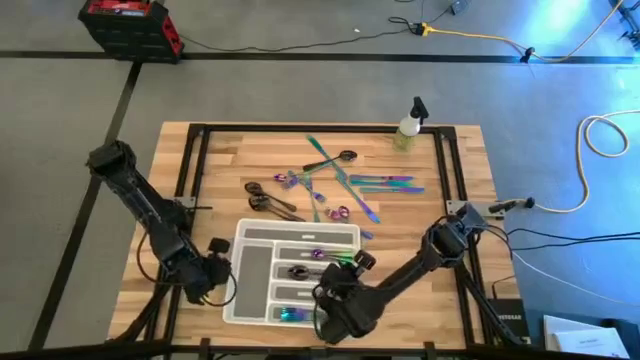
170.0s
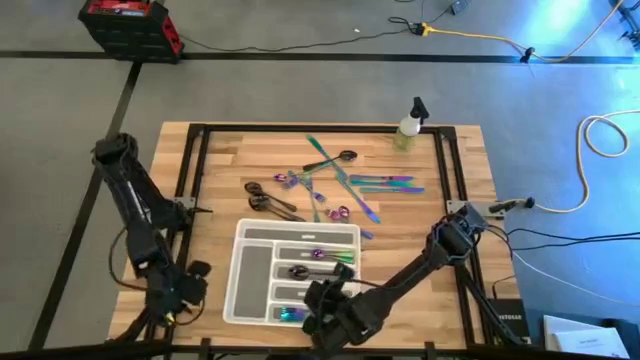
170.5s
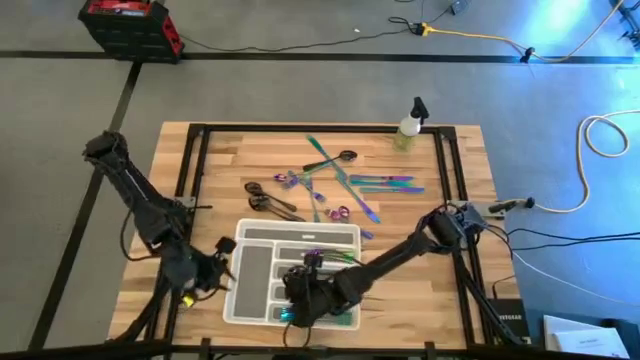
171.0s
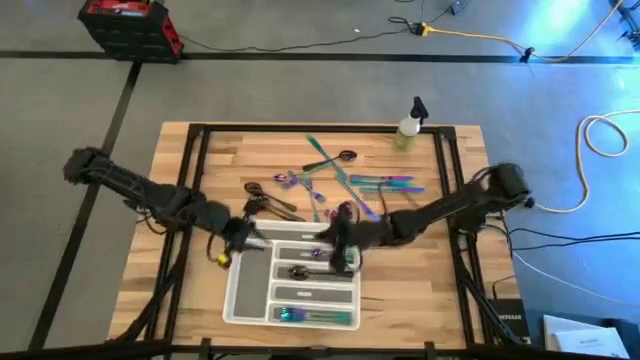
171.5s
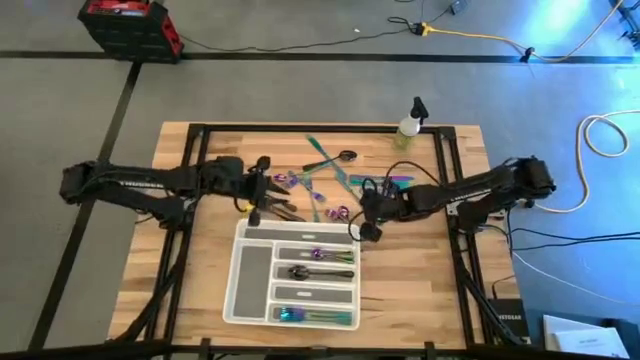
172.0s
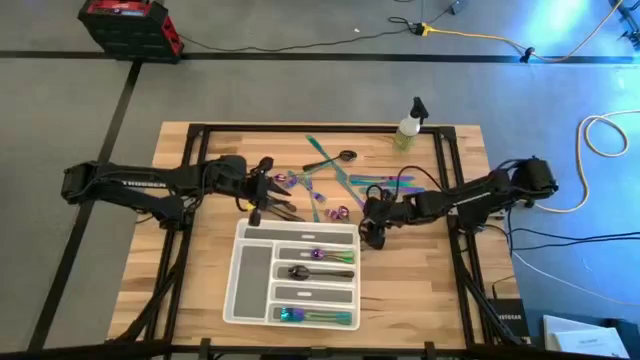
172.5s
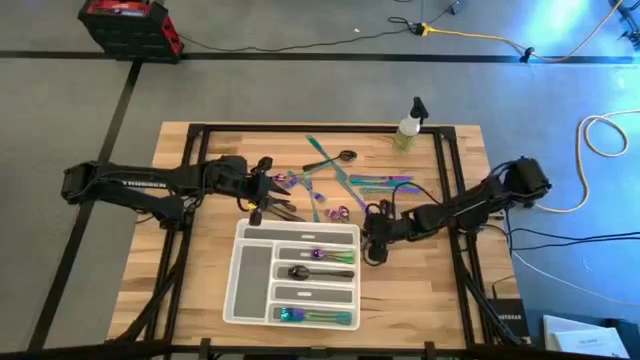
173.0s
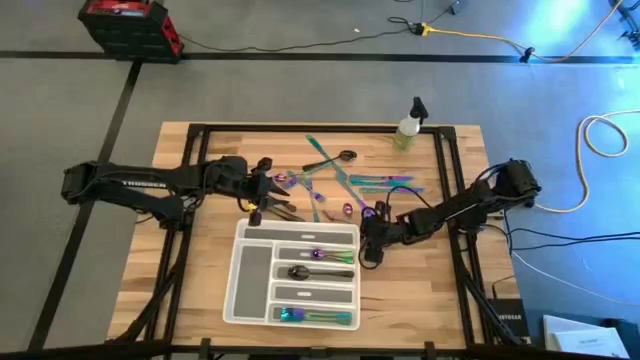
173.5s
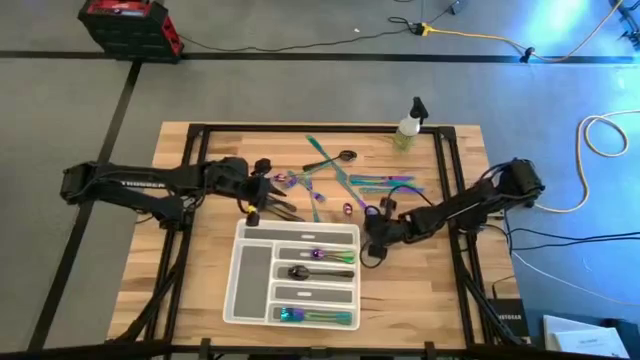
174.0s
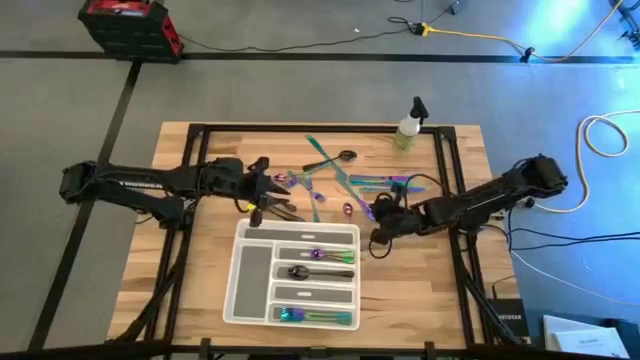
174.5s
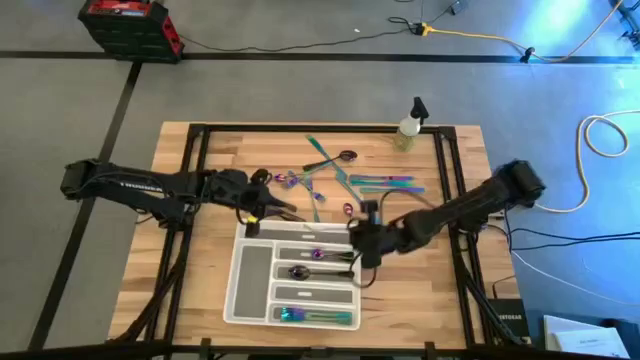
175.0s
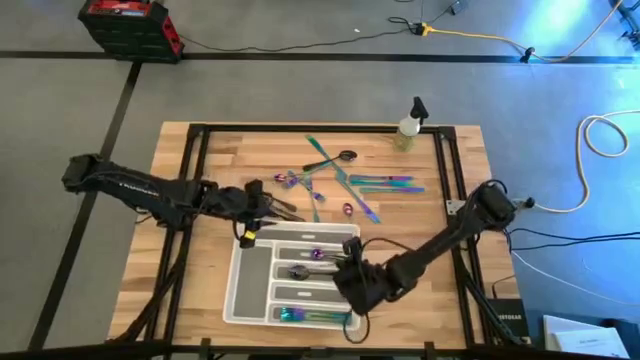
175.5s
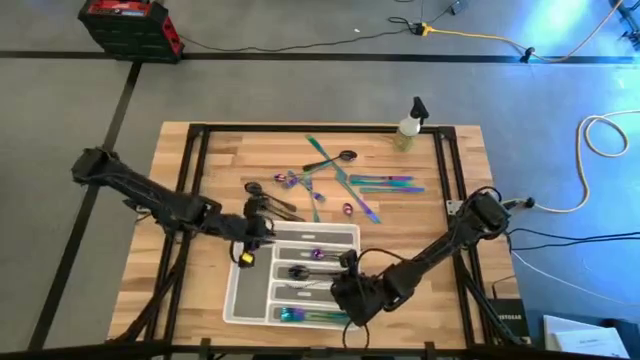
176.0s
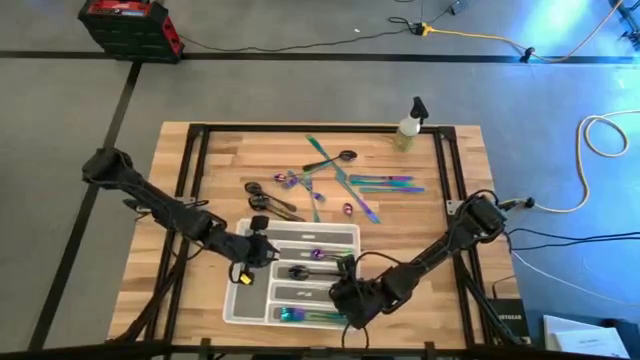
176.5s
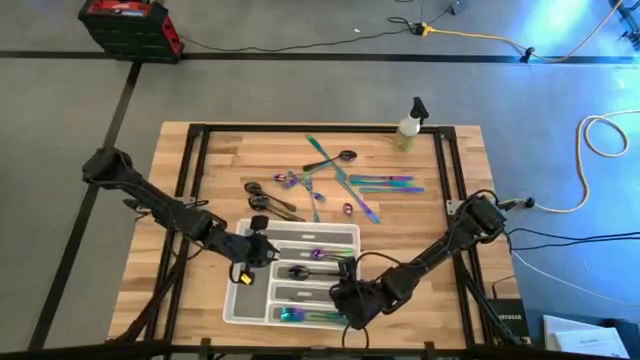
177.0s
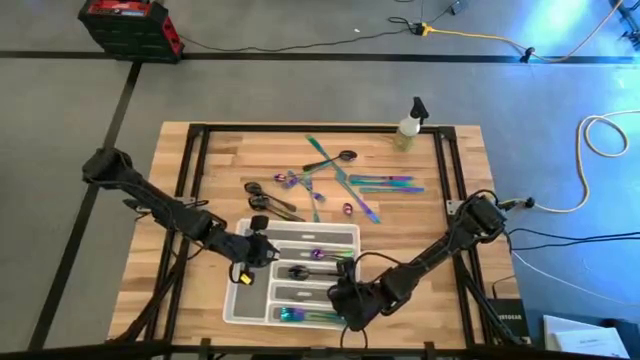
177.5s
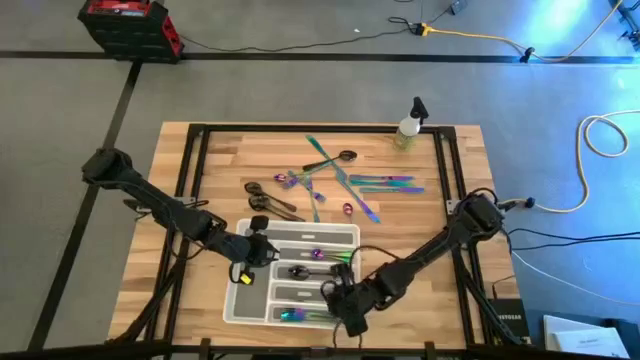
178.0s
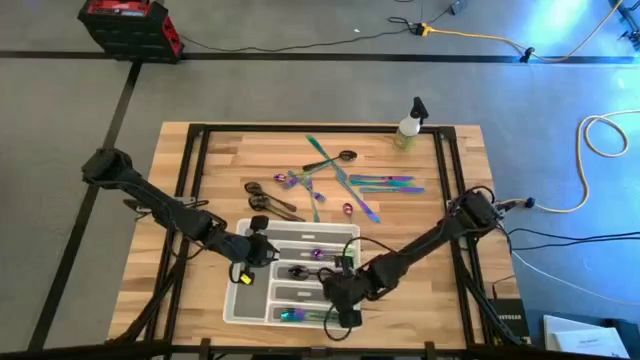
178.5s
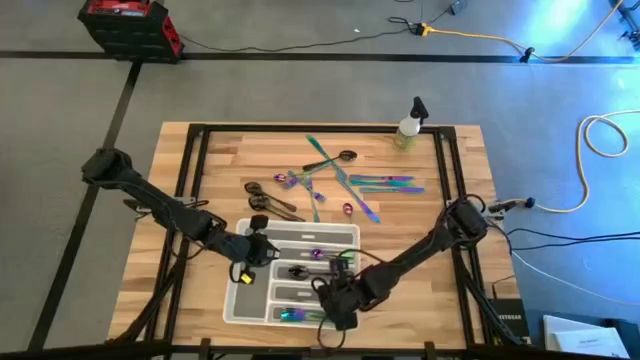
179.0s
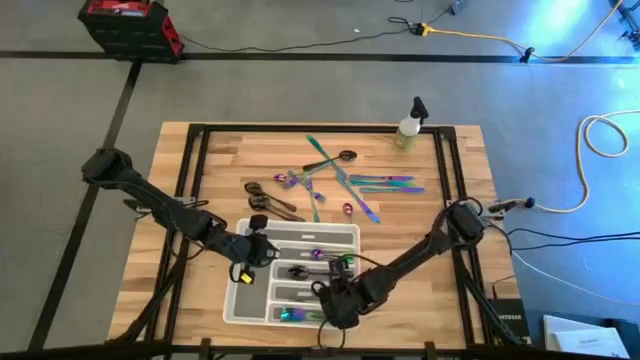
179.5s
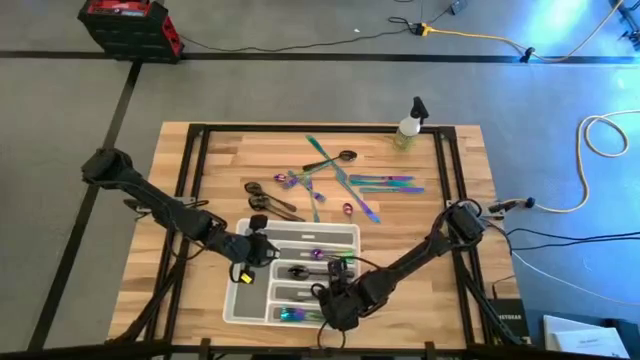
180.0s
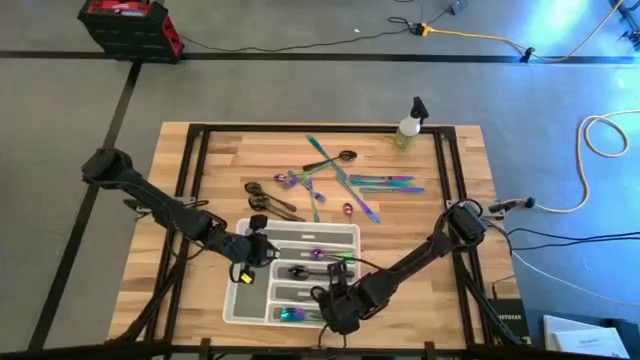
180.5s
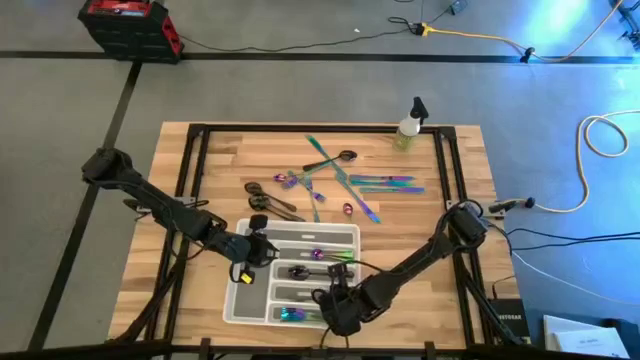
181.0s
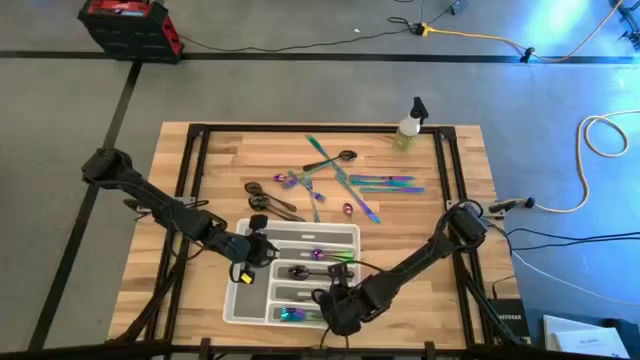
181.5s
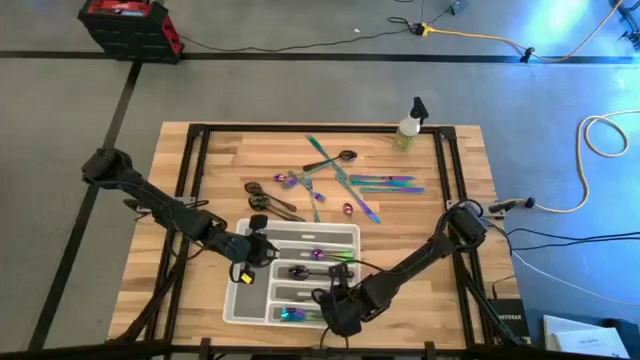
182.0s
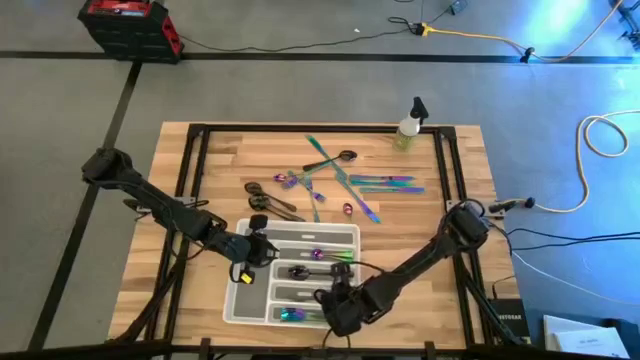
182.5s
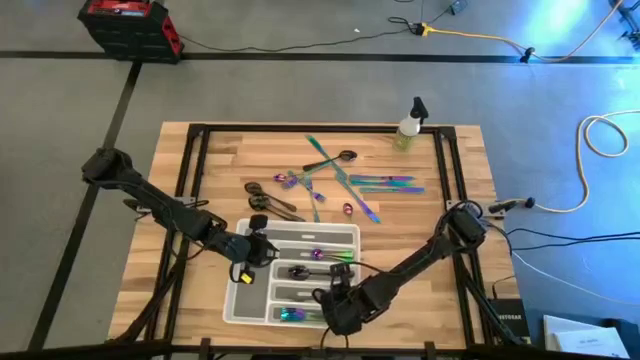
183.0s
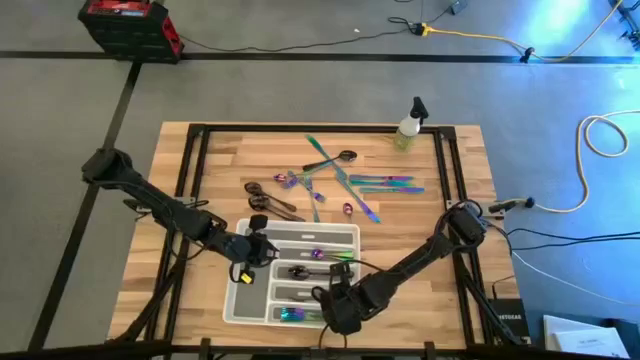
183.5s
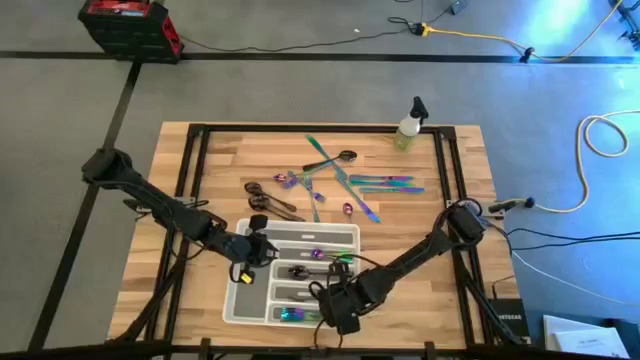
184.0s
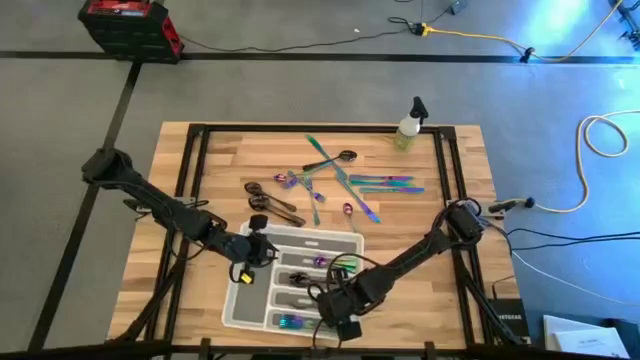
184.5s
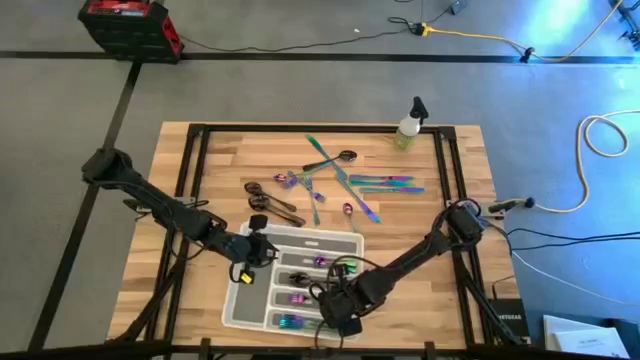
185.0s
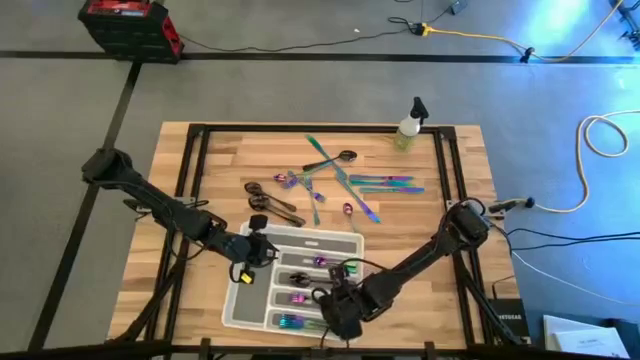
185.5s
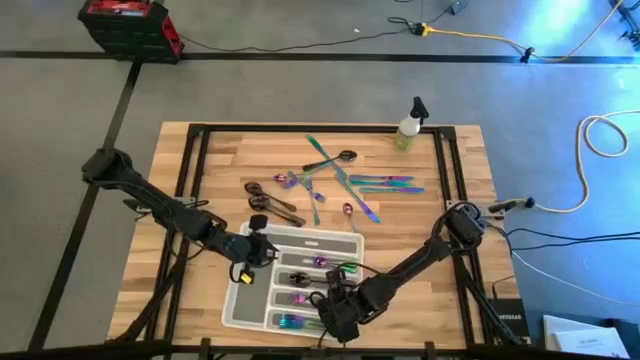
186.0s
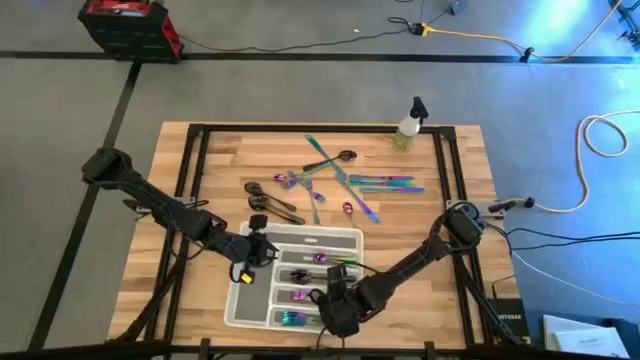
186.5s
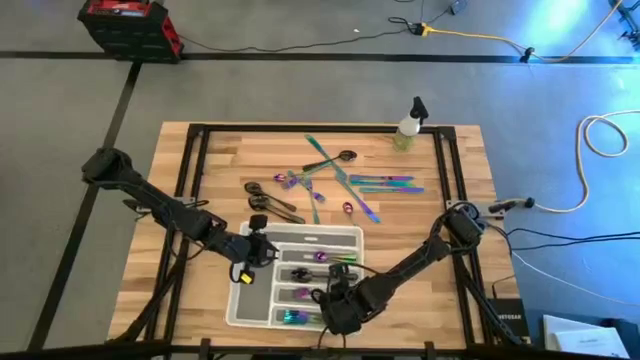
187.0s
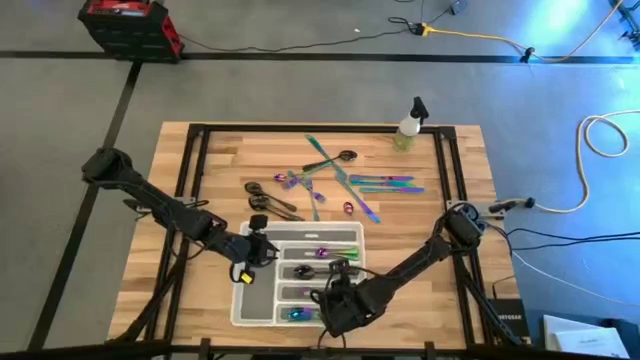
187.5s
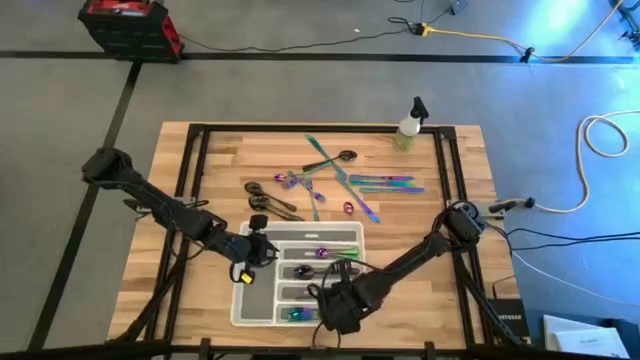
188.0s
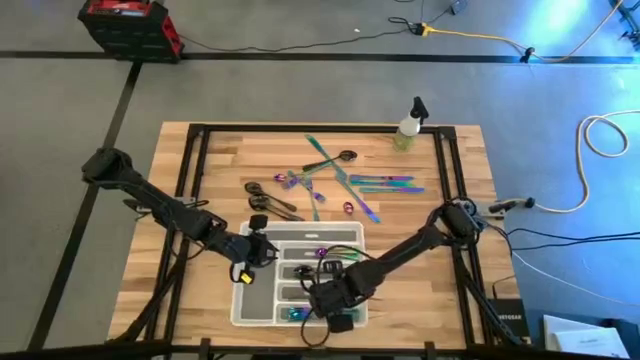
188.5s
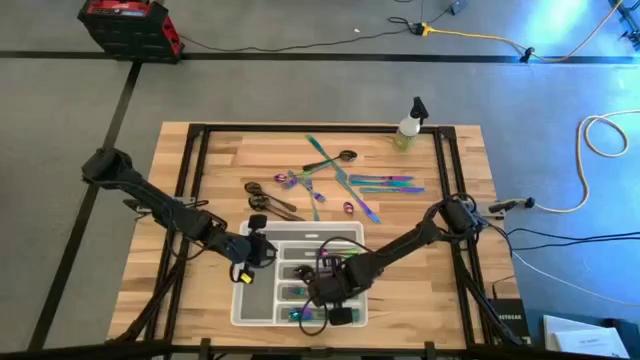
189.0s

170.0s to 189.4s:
Task: Sort silverware
Put the blue fork into the white silverware tray

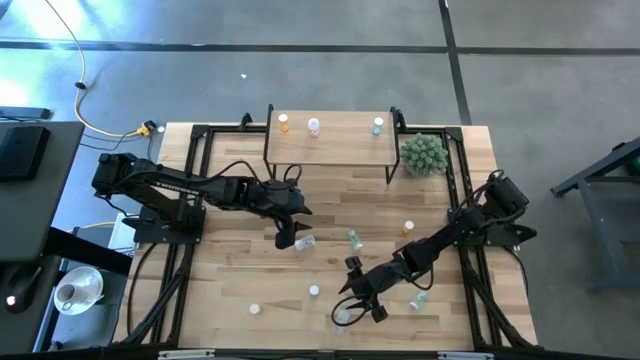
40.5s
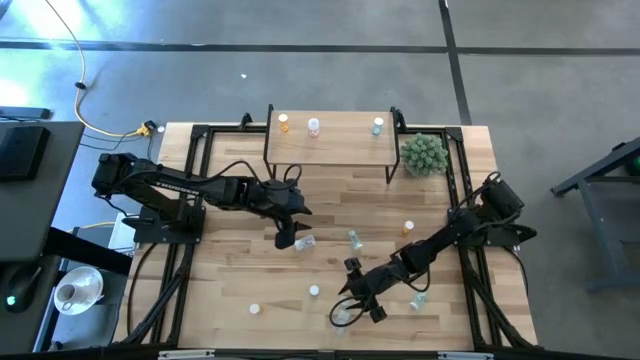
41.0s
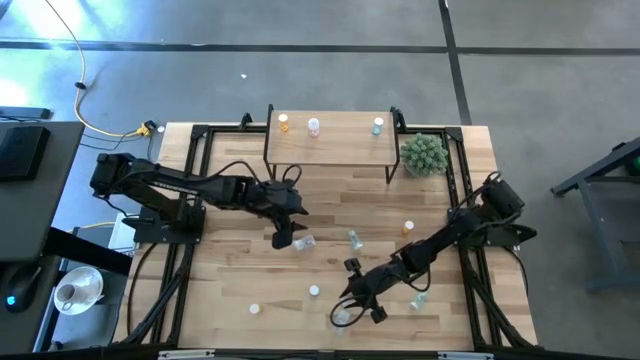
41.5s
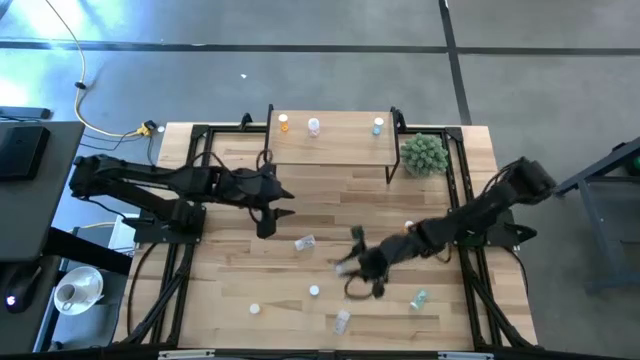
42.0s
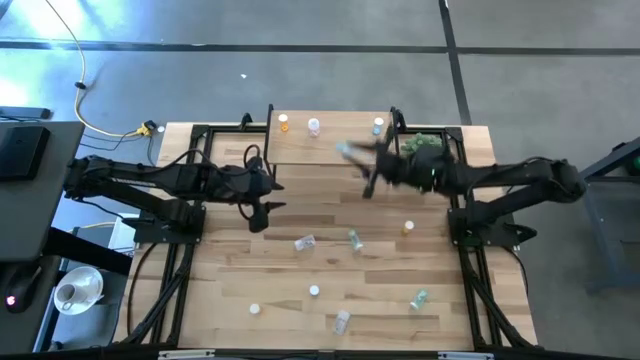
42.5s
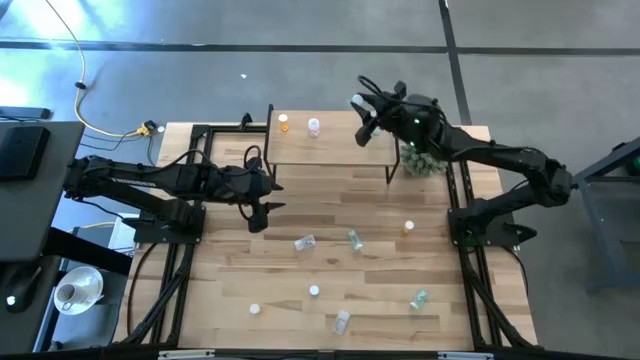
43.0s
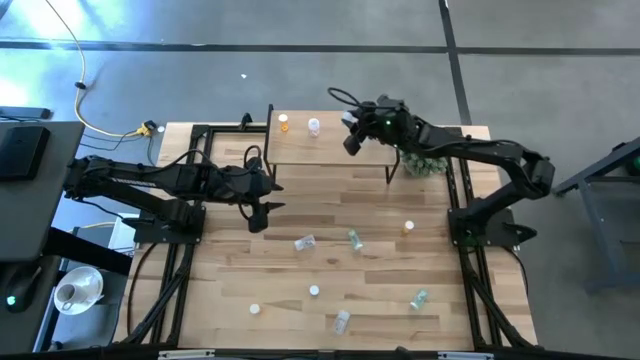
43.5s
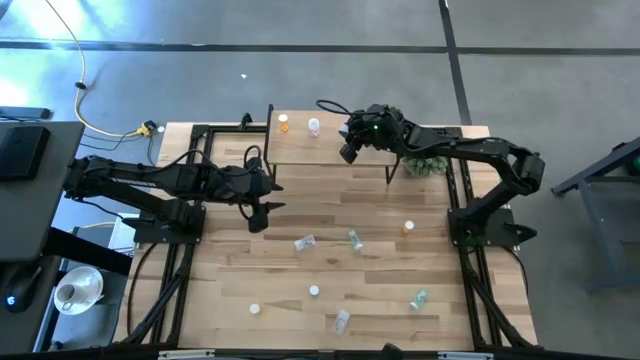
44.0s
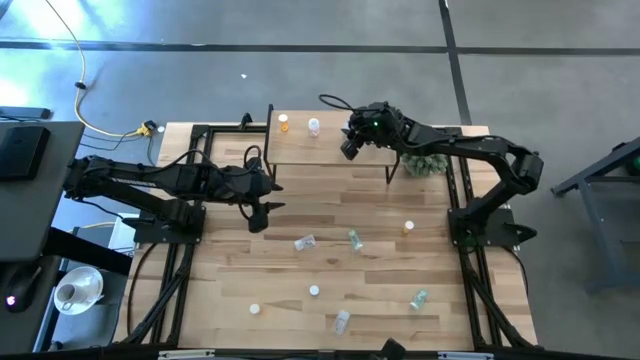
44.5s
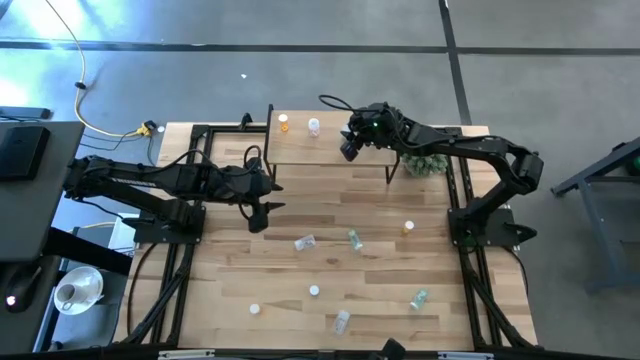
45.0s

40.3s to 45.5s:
Task: Pick and place medicine bottles onto shelf by color
Put the bottom green pill bottle on the shelf
